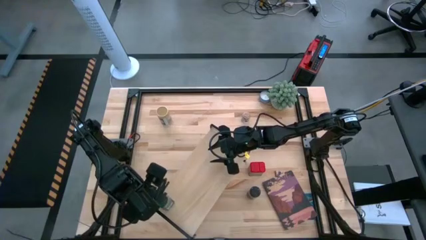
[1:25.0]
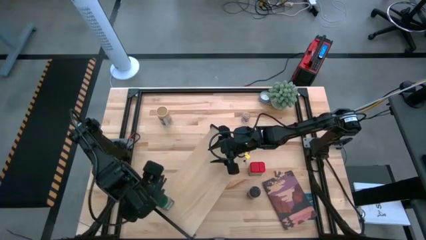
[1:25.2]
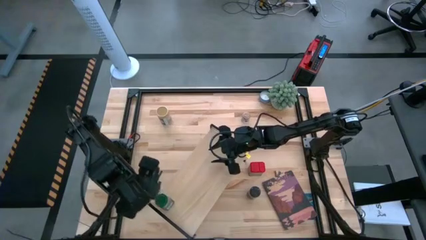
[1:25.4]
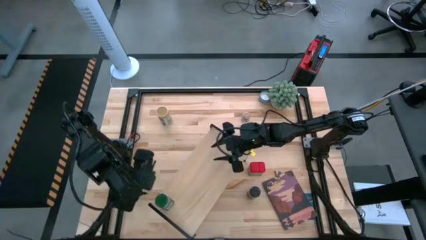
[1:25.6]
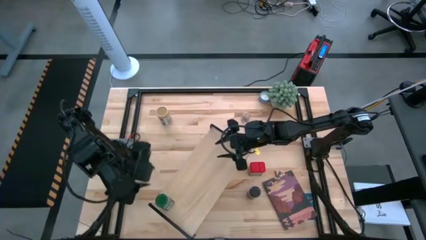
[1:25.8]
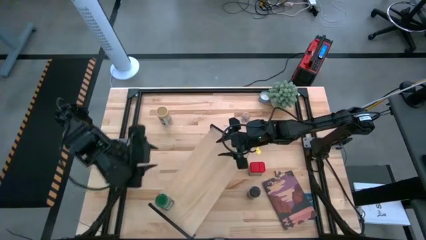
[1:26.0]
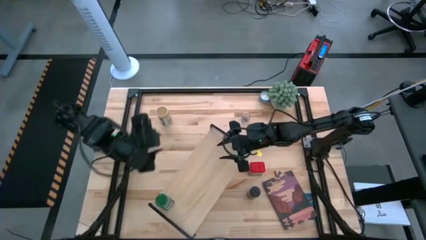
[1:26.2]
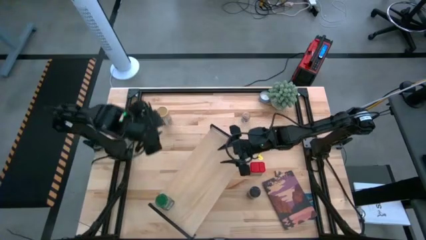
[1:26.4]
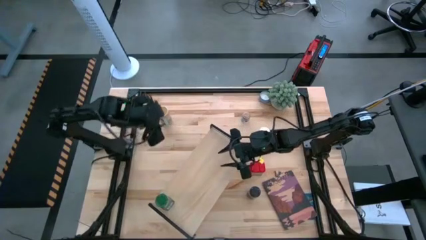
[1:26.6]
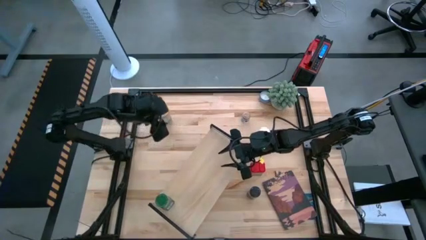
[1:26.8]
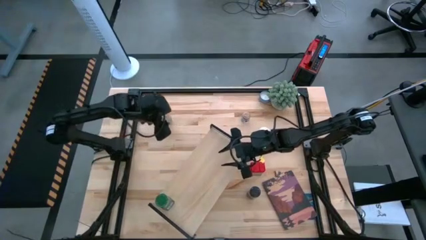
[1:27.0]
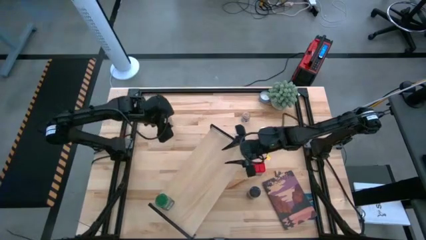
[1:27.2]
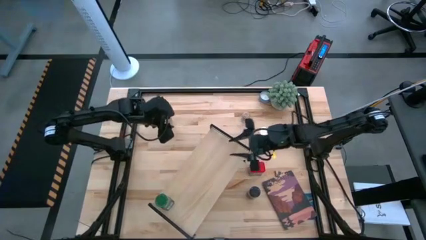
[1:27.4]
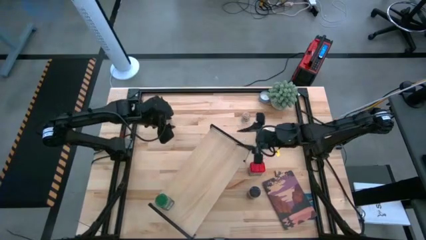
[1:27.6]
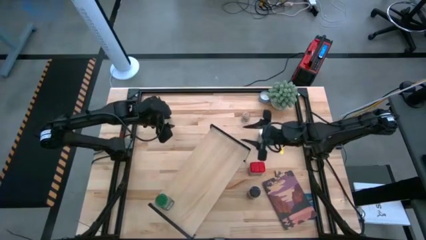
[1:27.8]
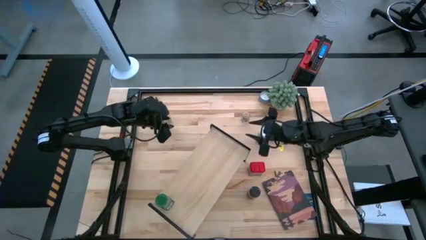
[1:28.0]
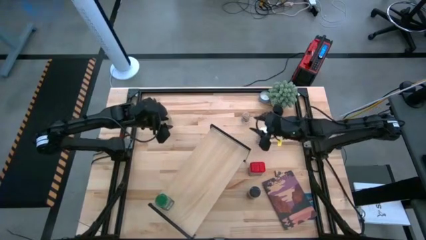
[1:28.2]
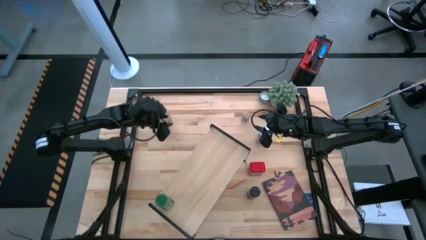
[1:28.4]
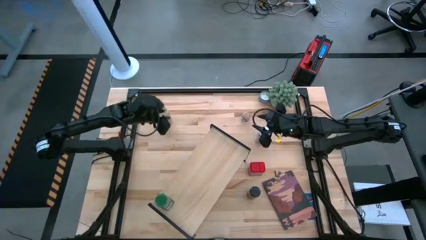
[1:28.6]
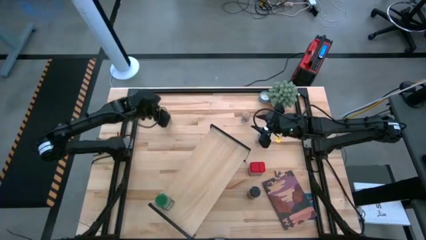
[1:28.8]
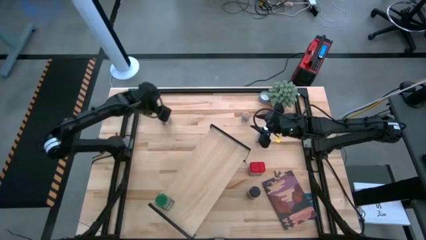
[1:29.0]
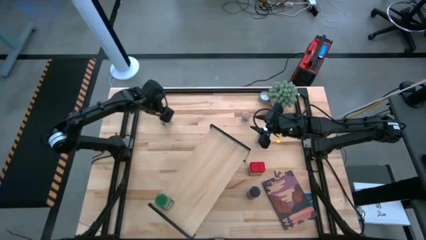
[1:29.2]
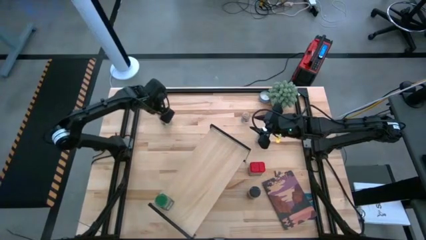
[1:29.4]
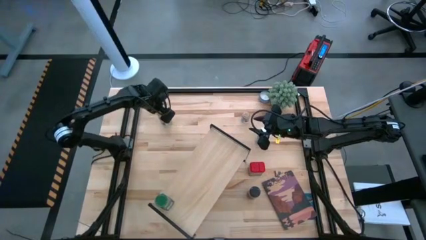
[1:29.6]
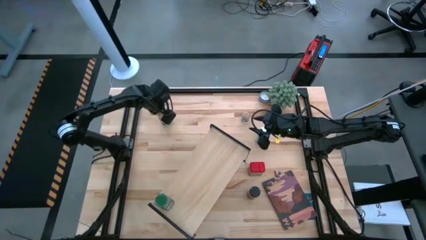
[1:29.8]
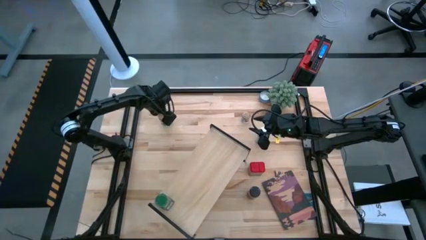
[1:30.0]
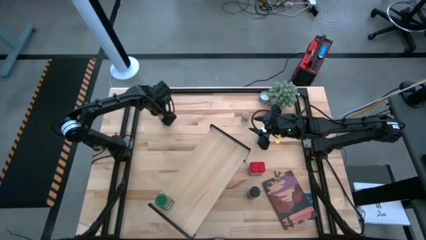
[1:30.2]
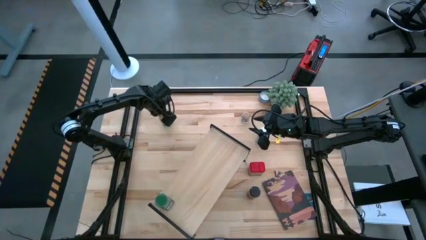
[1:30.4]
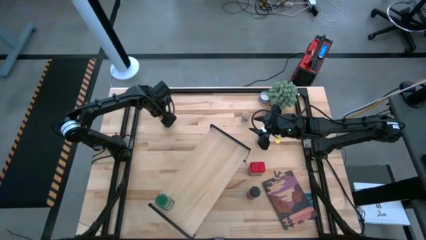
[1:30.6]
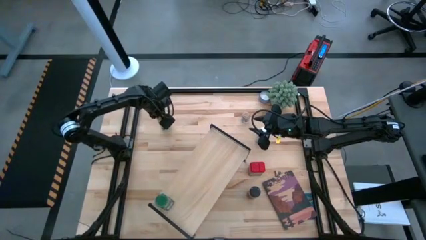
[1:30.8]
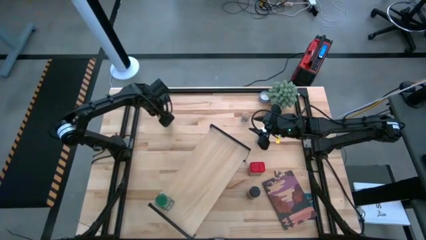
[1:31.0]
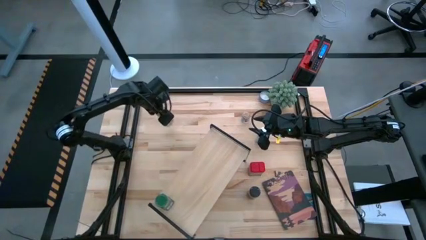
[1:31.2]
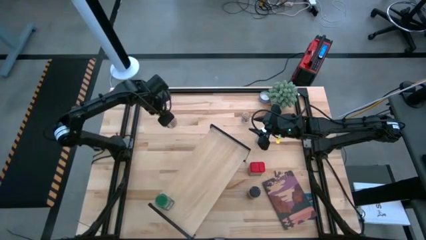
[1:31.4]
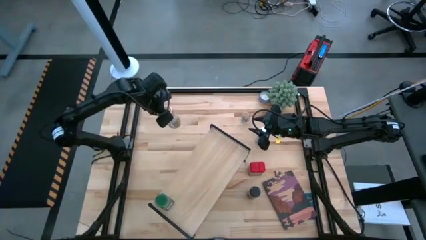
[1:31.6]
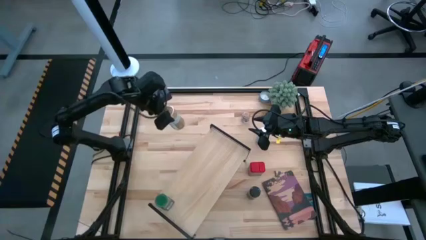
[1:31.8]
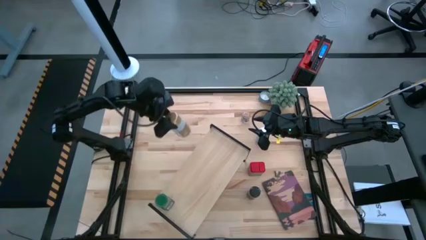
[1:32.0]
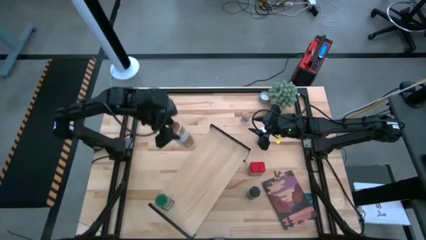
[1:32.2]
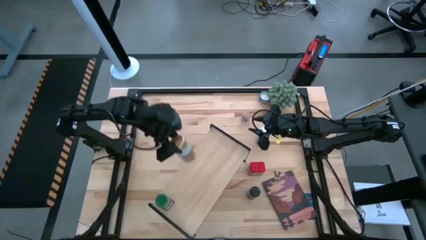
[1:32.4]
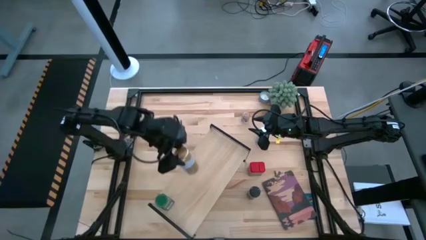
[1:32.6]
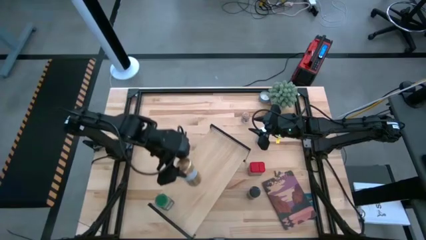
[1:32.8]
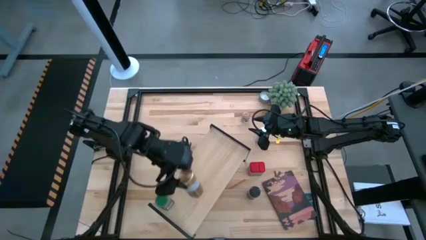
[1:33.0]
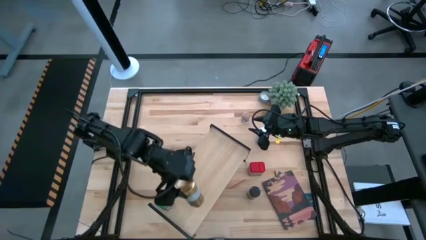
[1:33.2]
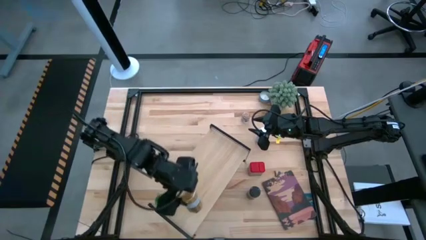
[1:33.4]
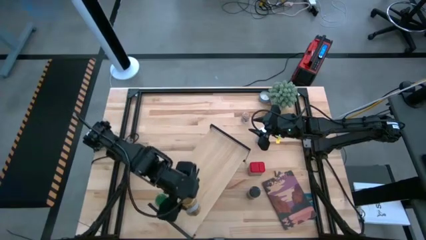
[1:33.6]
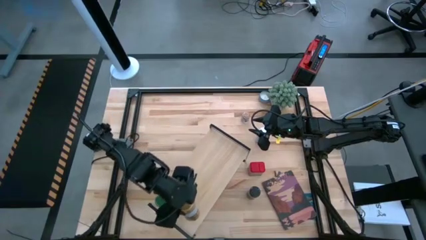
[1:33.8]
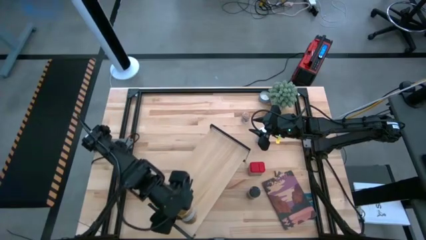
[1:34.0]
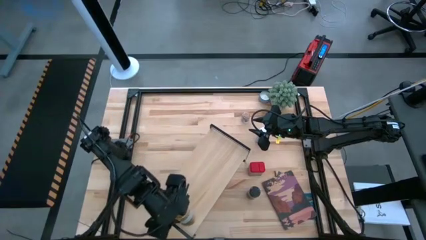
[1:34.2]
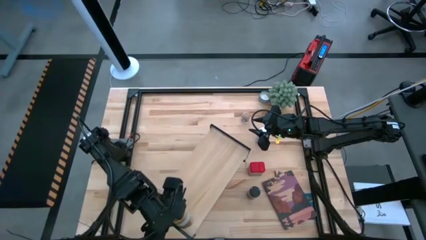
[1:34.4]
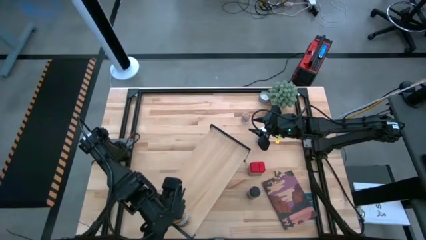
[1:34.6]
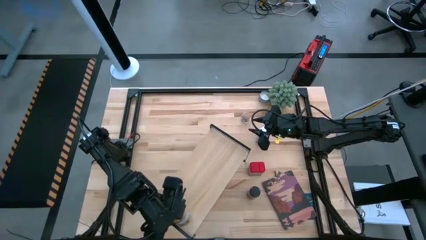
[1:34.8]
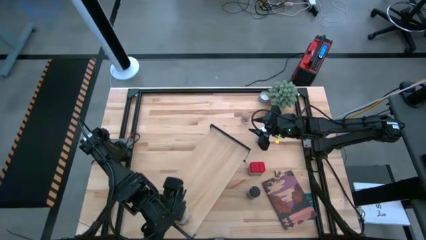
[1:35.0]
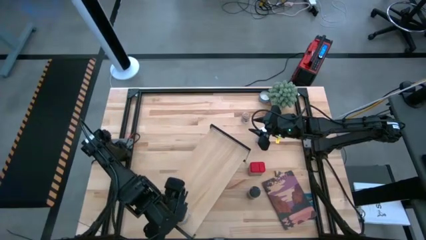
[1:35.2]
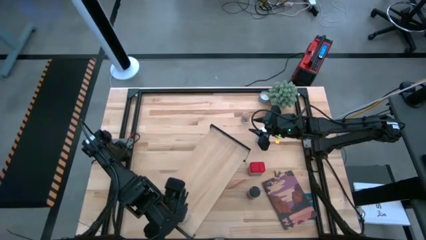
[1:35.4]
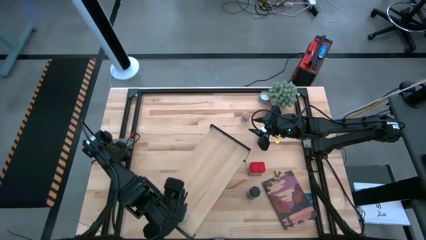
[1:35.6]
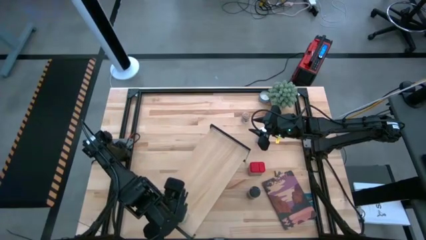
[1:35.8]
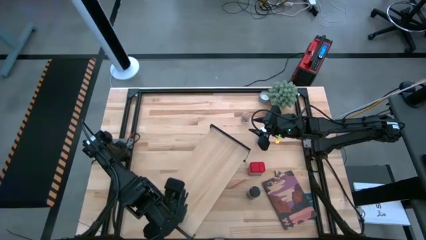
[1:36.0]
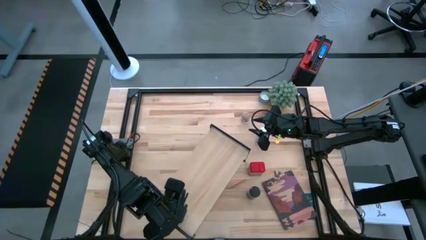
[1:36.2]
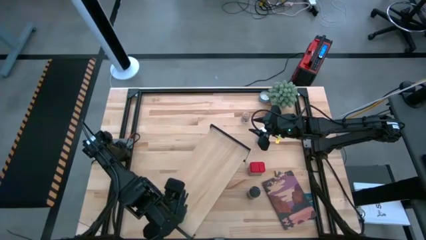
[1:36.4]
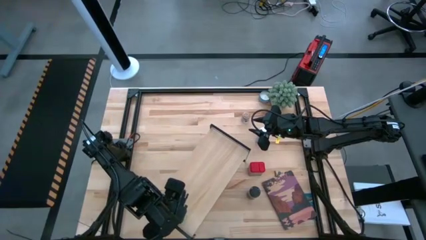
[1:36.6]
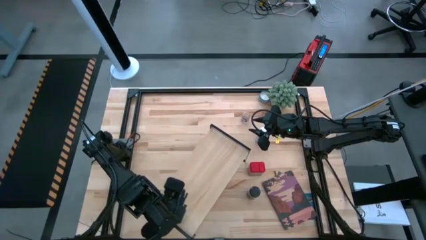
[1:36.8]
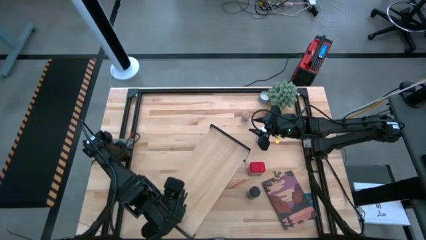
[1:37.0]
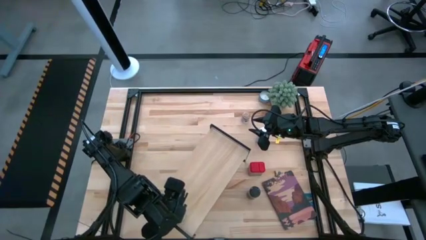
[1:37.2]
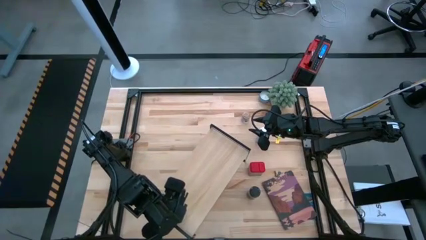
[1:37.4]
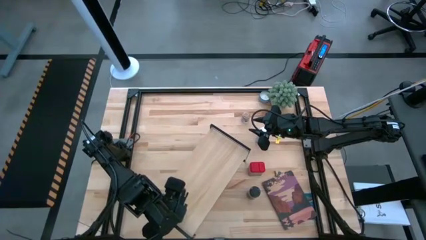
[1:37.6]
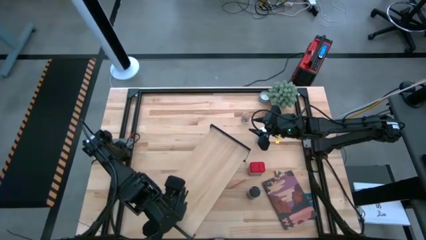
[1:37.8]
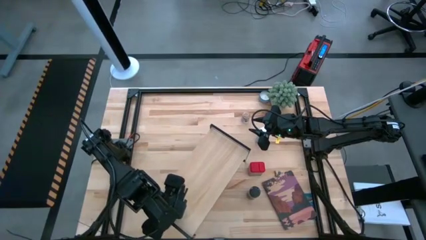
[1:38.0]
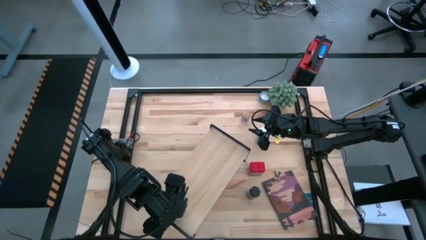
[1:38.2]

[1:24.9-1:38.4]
Task: Shelf spices
Put the gold seasoning bottle on the shelf

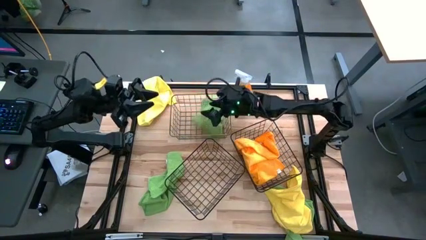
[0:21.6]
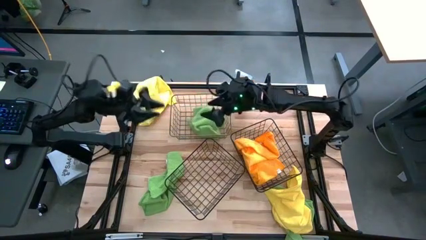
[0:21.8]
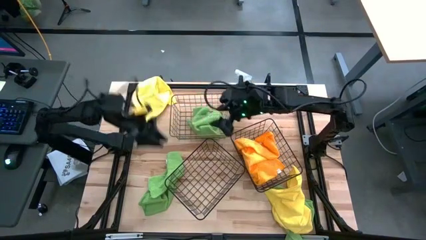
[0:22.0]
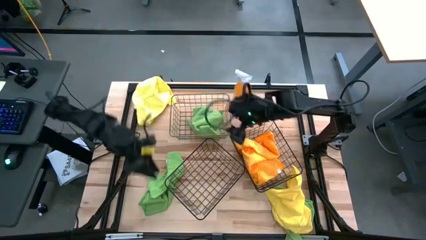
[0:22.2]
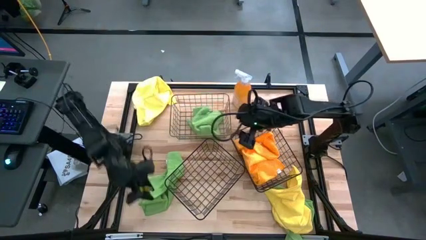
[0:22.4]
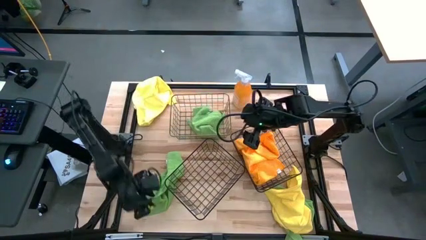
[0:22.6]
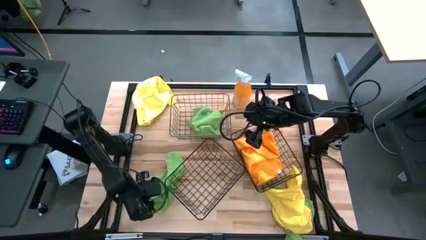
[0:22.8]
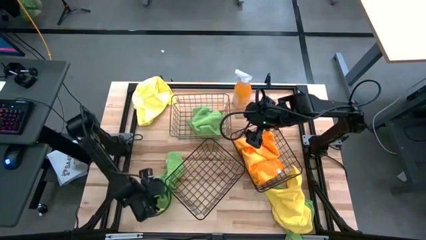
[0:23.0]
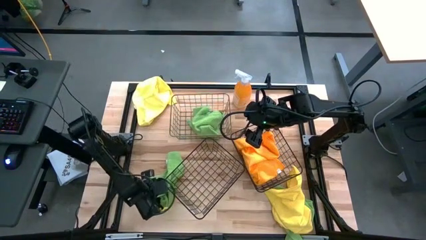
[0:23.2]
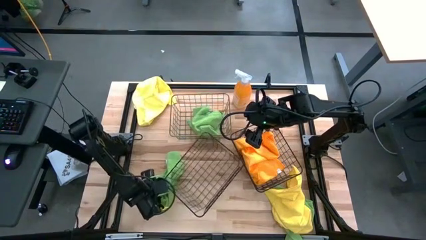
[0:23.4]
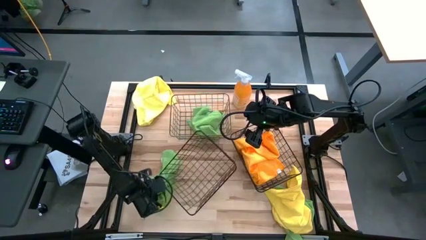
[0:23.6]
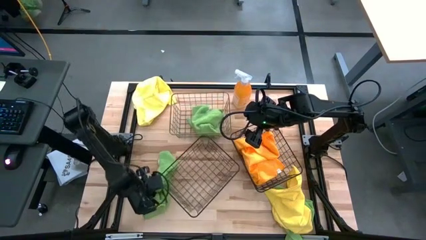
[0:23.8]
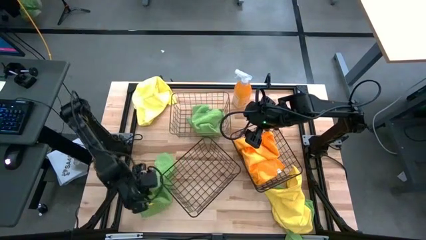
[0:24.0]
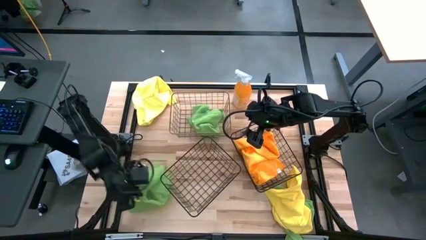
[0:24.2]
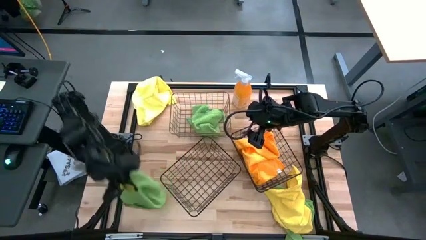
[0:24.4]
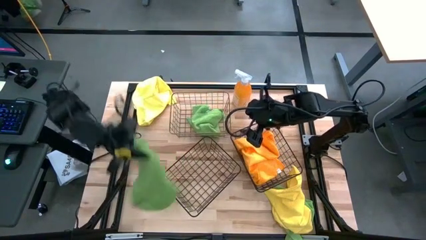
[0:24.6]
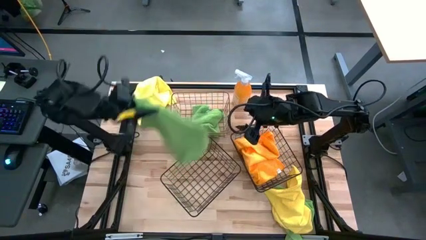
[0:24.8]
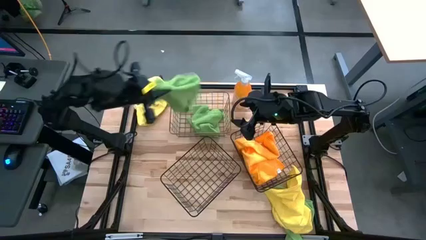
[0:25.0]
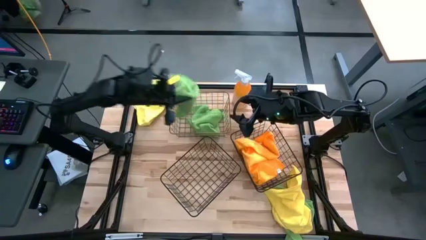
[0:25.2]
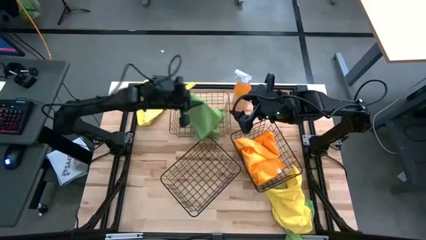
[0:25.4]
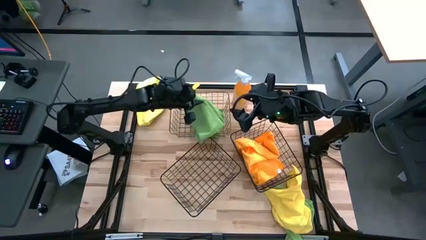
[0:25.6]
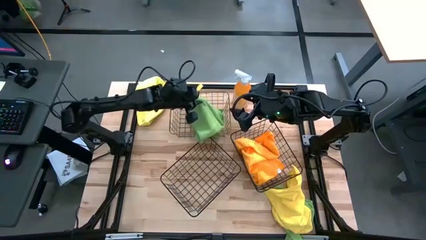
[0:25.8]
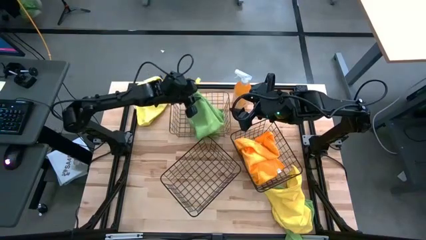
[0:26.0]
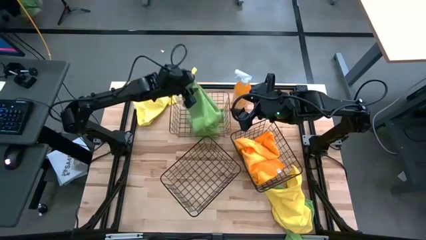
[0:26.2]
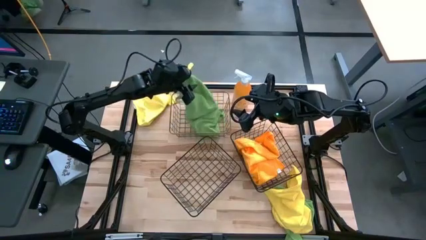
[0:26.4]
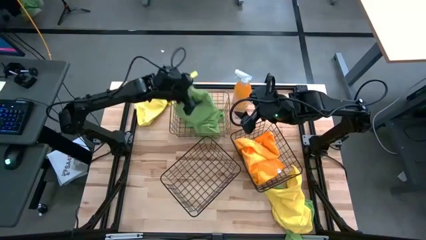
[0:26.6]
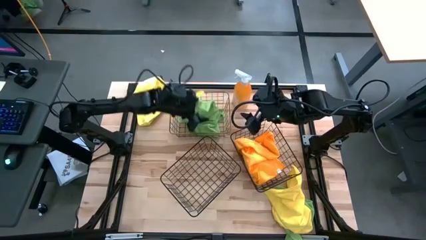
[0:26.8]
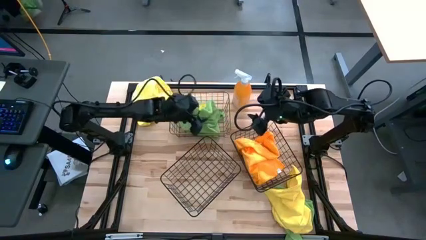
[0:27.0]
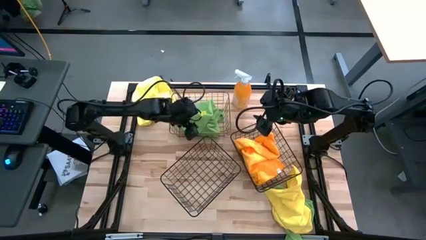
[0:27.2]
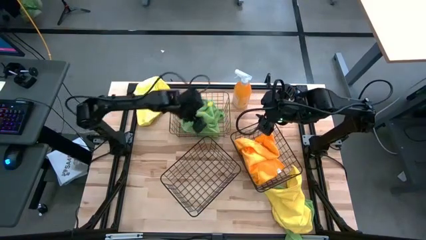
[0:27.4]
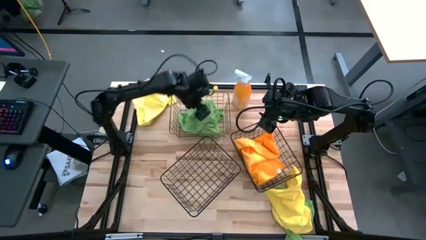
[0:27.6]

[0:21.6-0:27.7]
Task: Sort microfiber towel by color & place in baskets
Put the left green microfiber cloth into the top wire basket
